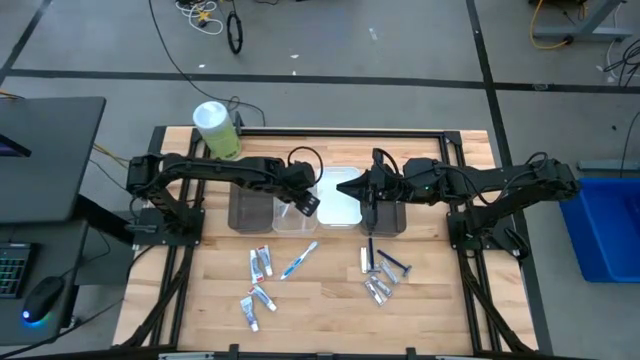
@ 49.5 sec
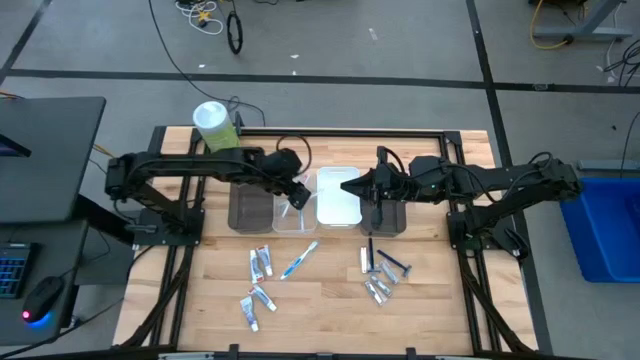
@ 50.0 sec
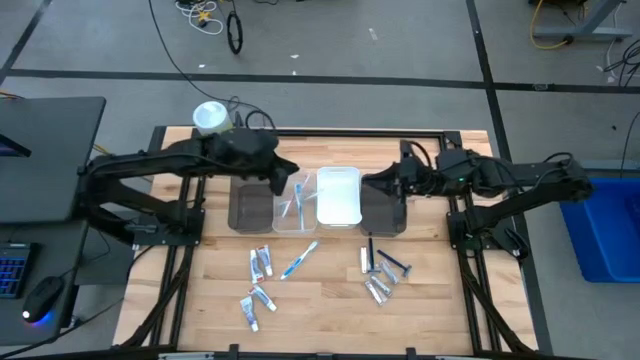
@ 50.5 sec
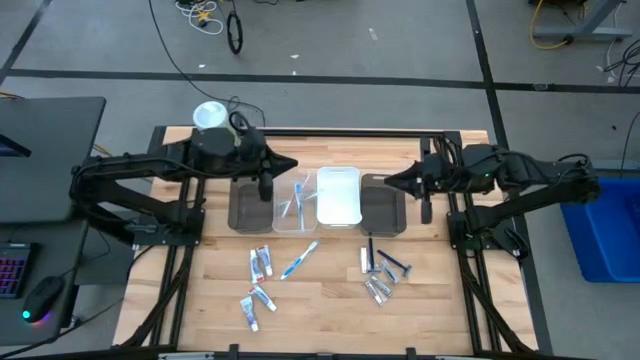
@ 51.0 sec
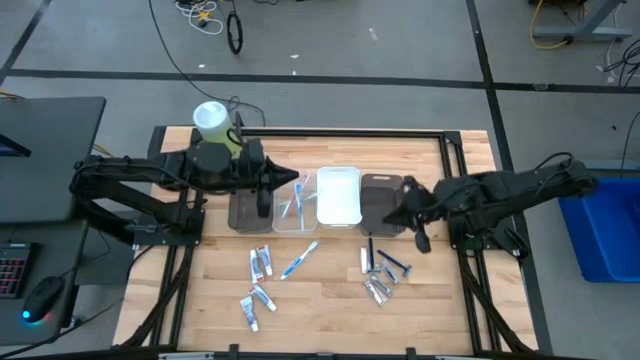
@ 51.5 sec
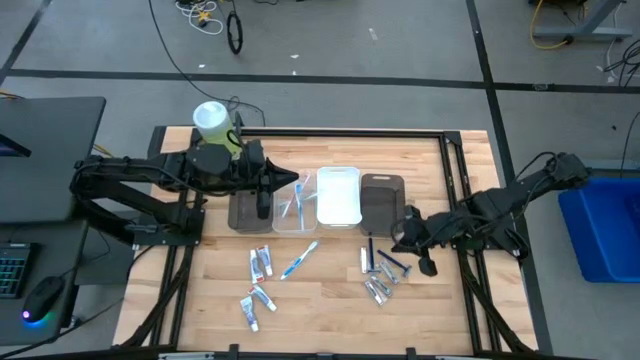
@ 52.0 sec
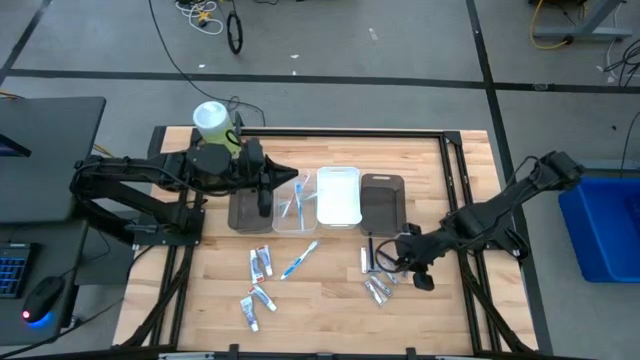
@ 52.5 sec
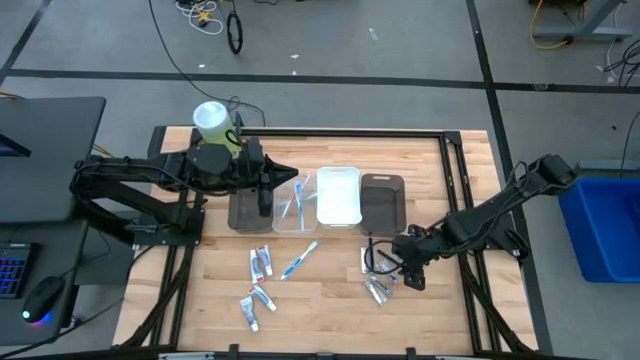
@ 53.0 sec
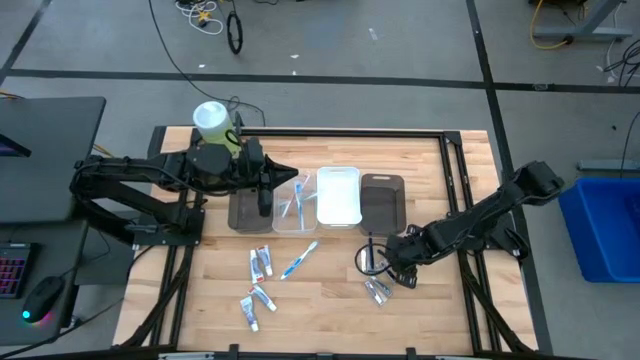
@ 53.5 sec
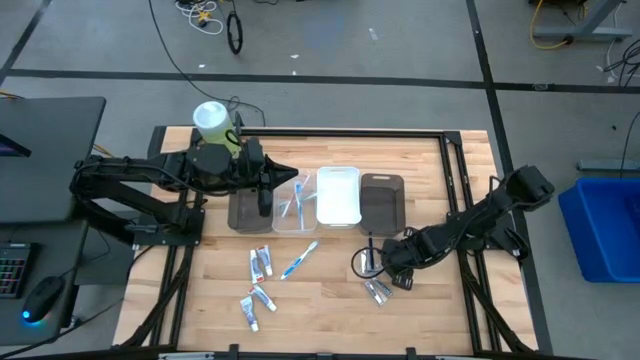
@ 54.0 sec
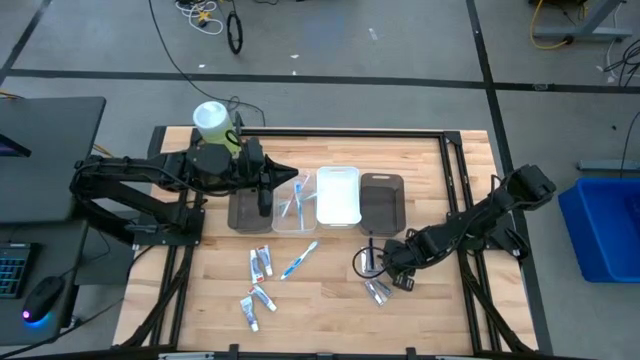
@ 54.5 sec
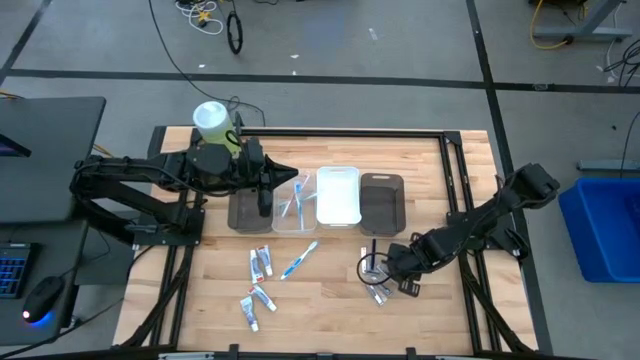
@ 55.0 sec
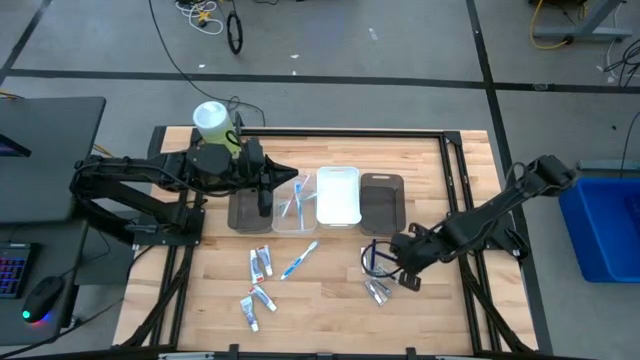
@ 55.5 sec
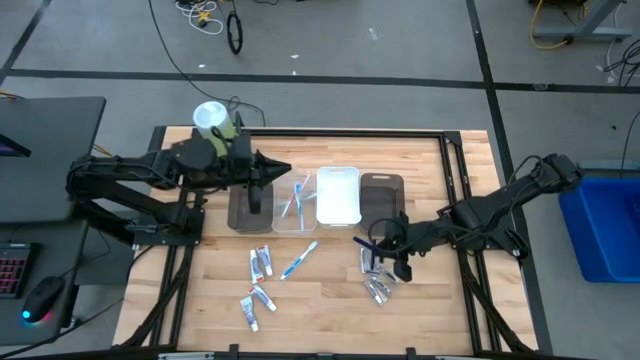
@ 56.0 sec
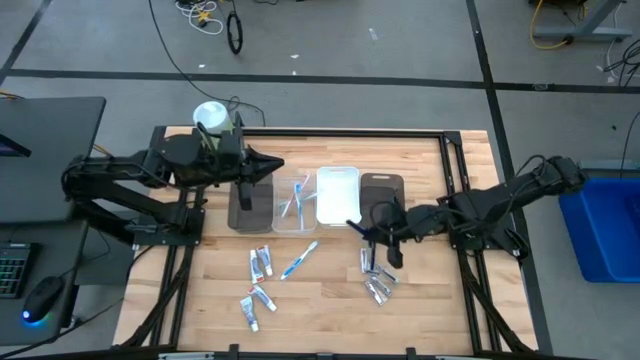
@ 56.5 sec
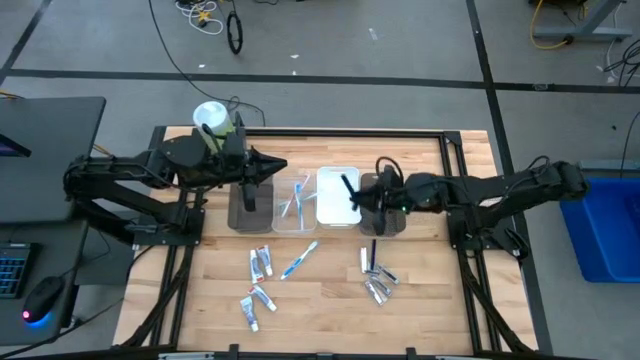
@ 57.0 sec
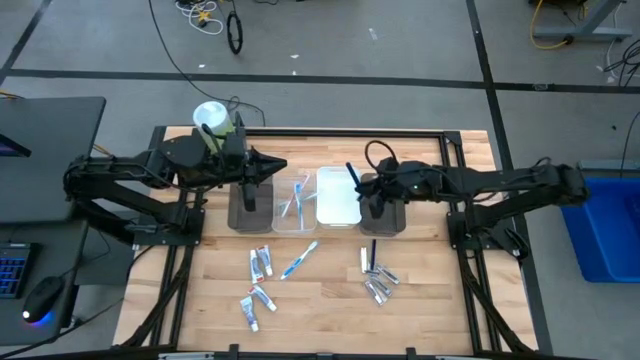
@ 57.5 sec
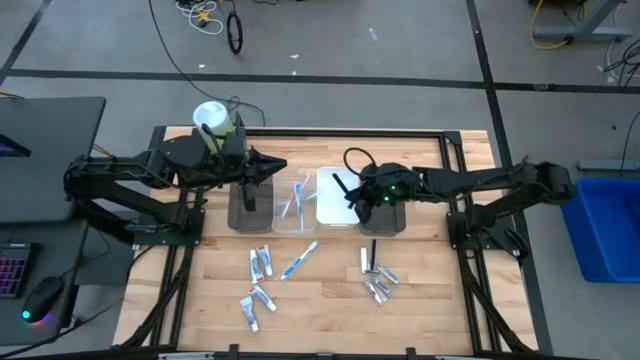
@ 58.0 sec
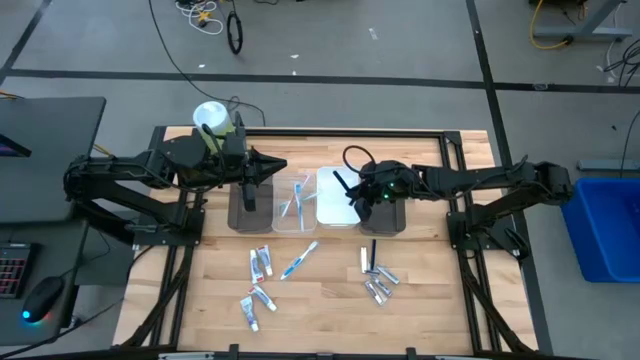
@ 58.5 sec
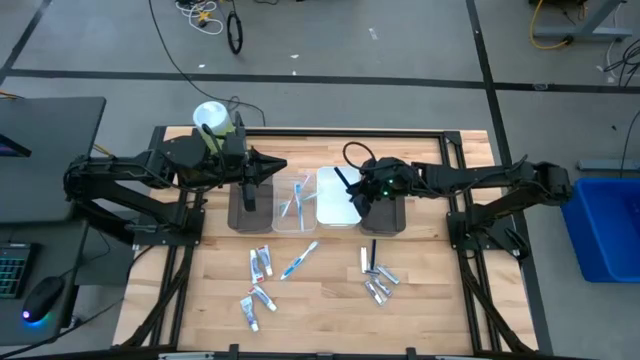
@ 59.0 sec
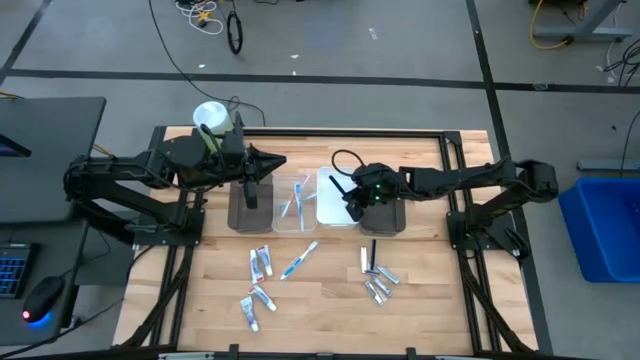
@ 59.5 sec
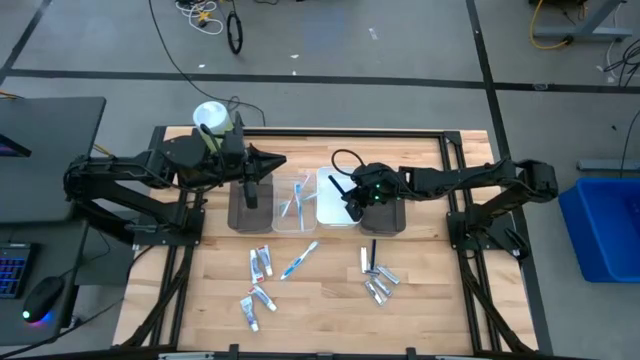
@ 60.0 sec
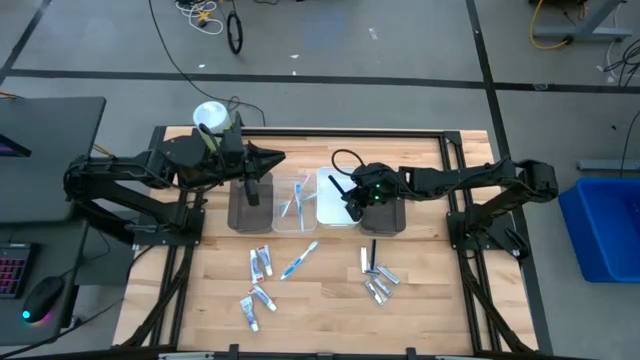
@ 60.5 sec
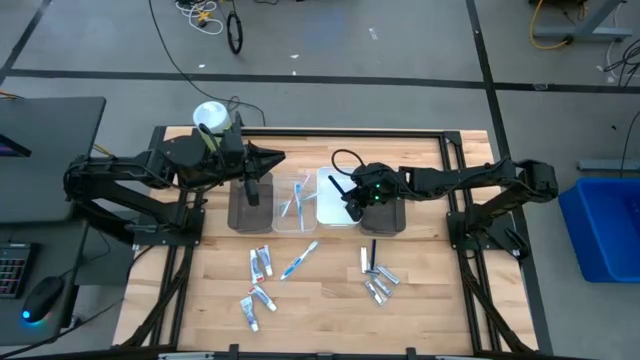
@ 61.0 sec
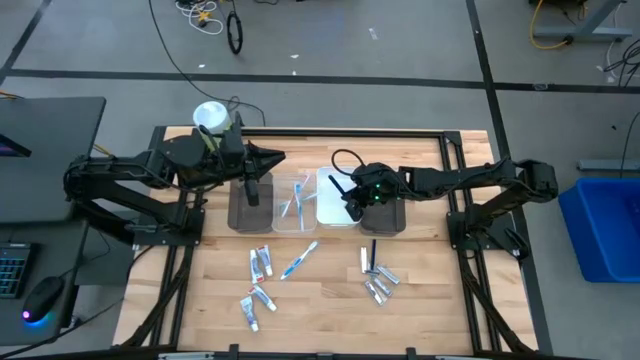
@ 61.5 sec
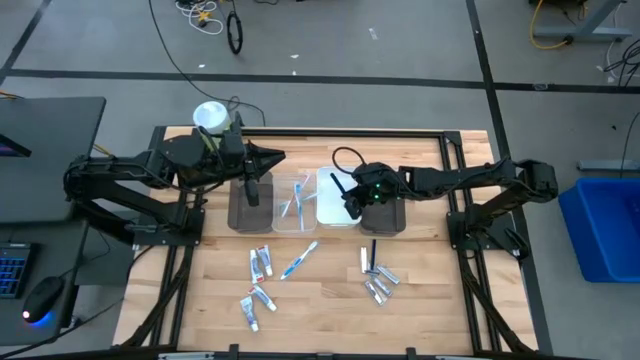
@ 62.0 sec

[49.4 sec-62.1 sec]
Task: Pick & Place Travel size toiletries
Put the blue razor into the white bin

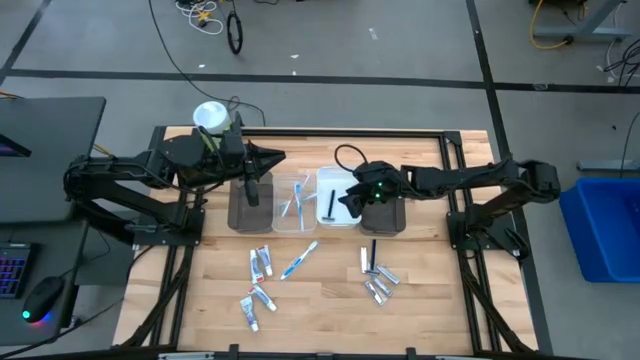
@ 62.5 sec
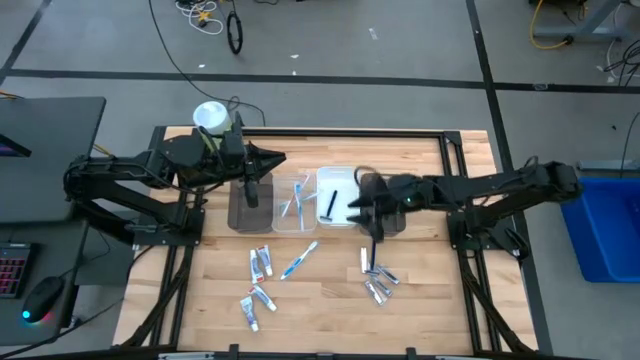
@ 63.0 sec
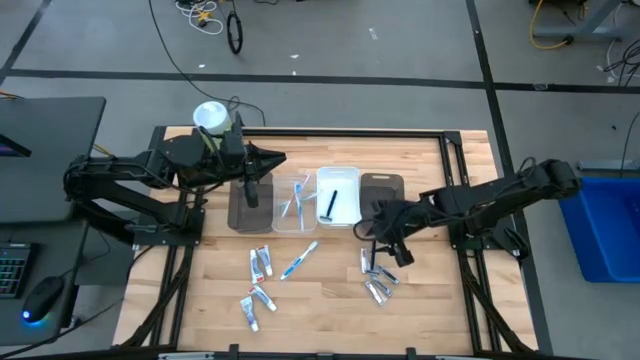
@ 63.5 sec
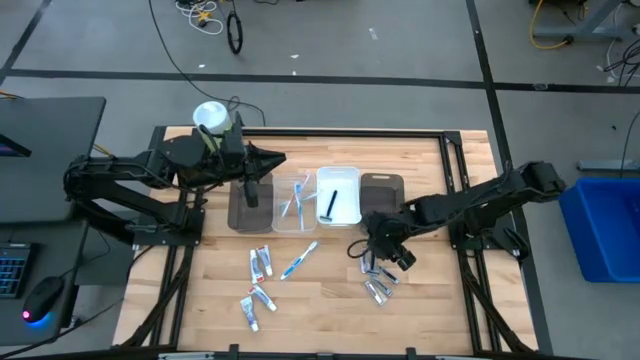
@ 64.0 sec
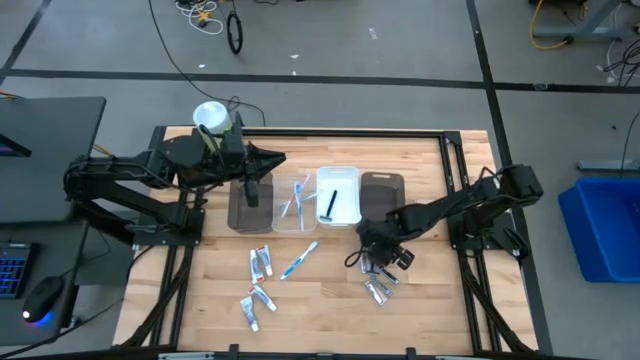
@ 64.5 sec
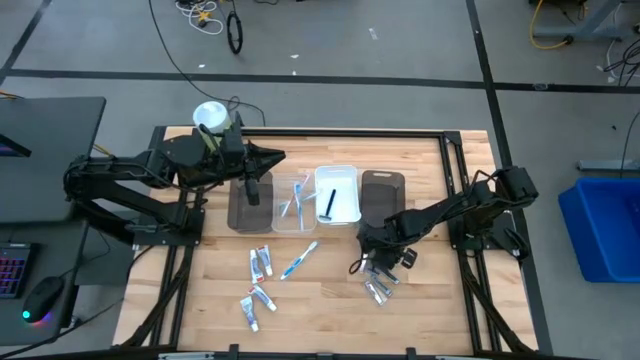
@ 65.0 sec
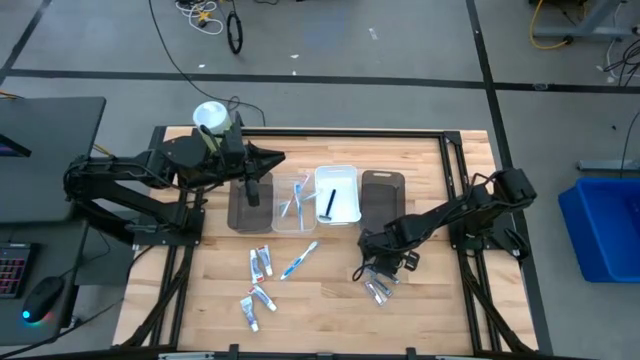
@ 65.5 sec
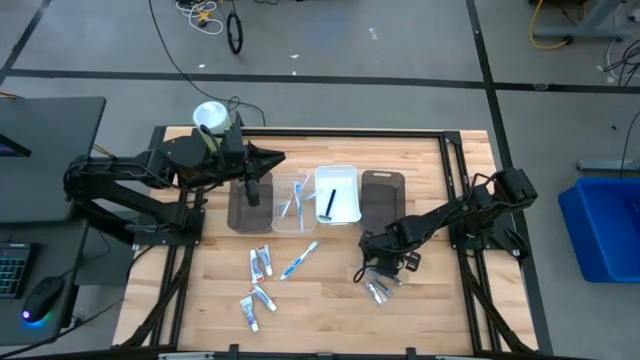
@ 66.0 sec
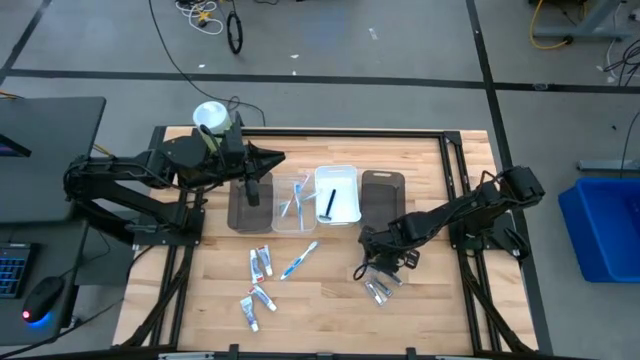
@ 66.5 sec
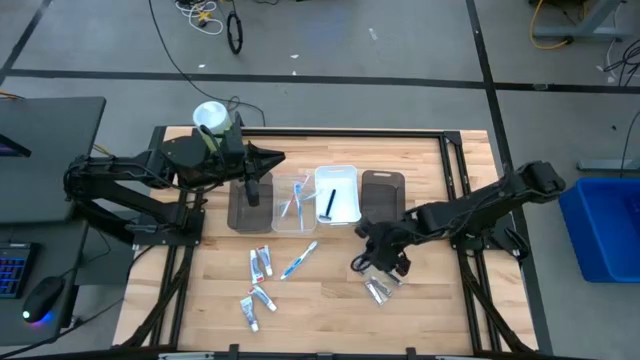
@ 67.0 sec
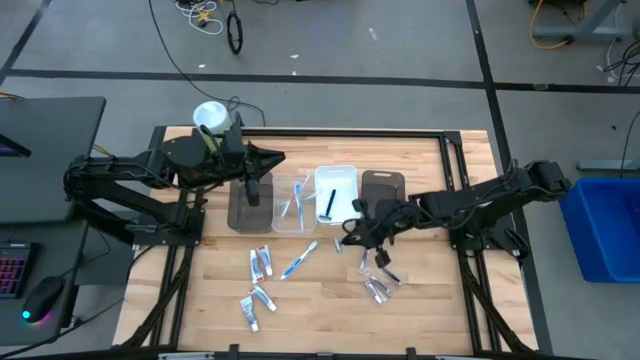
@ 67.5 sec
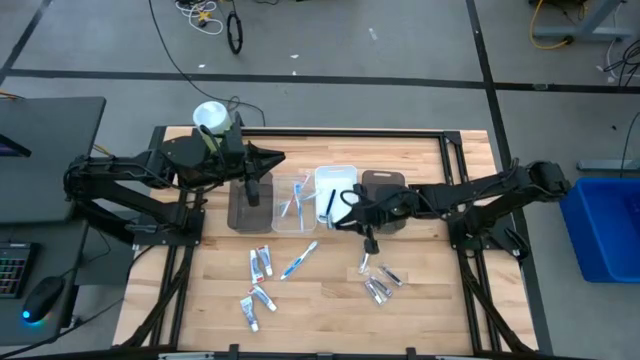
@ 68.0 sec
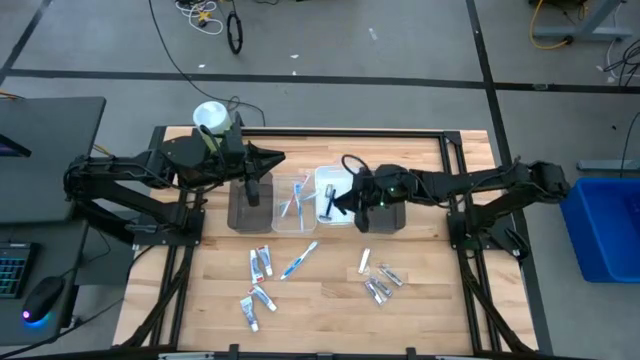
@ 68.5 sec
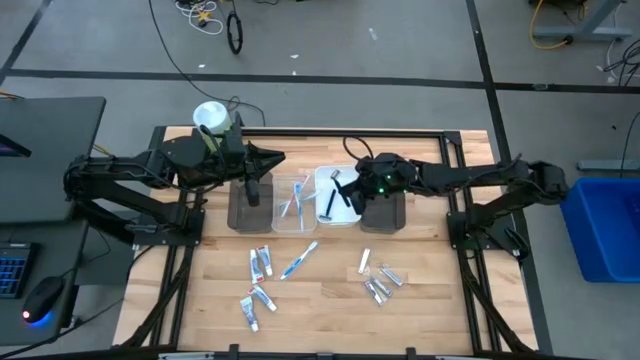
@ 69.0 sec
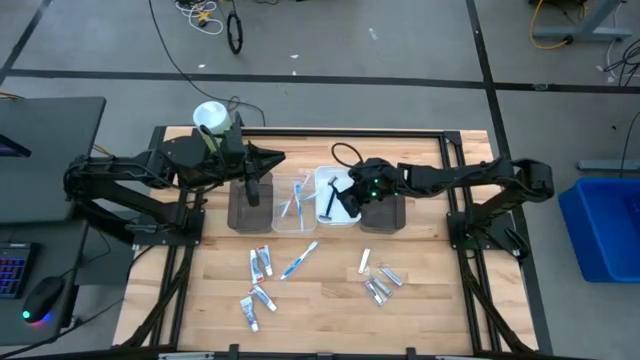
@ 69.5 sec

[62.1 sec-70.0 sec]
Put the blue razor into the white bin
